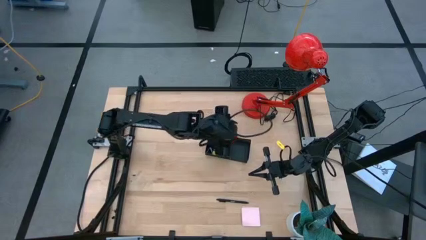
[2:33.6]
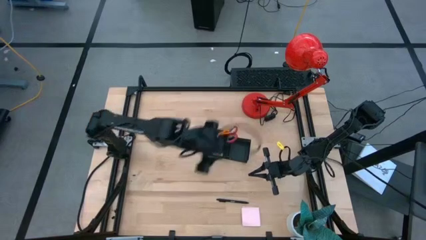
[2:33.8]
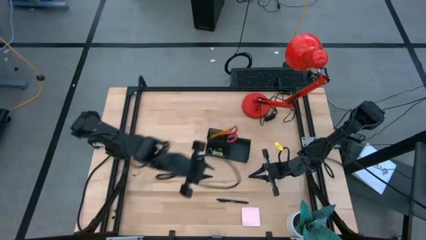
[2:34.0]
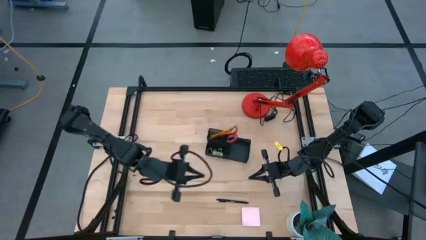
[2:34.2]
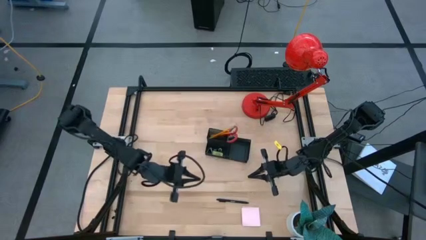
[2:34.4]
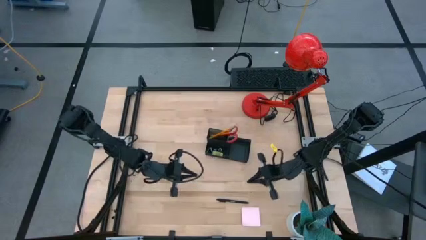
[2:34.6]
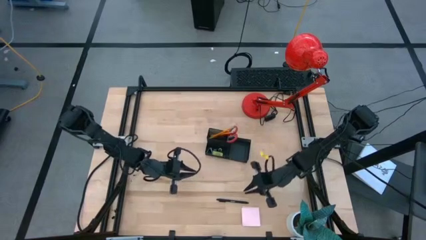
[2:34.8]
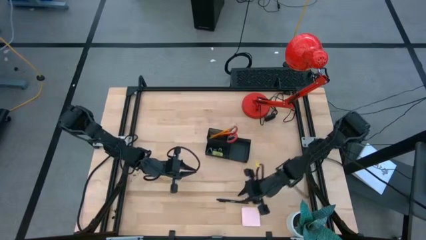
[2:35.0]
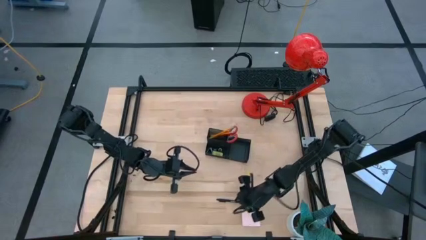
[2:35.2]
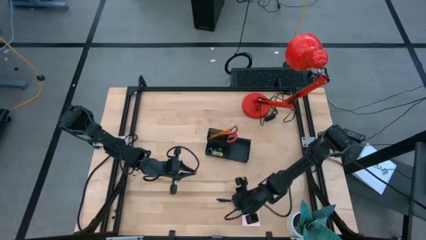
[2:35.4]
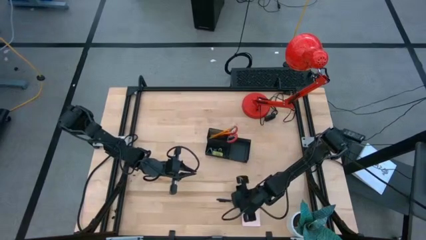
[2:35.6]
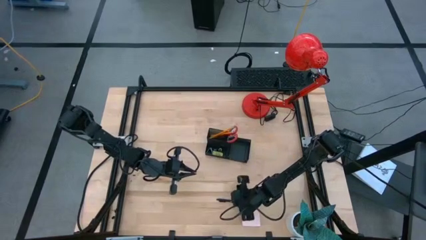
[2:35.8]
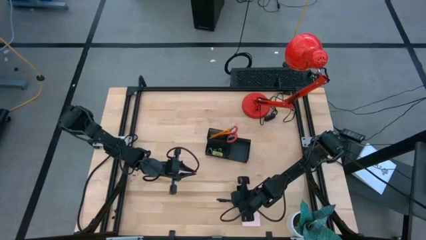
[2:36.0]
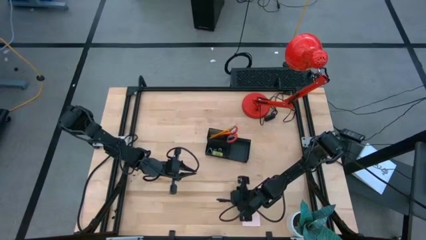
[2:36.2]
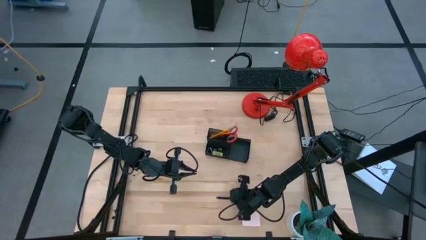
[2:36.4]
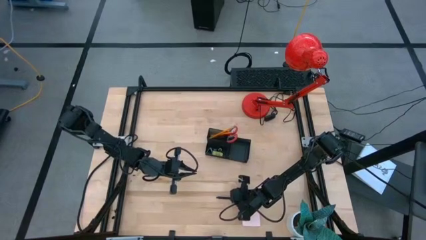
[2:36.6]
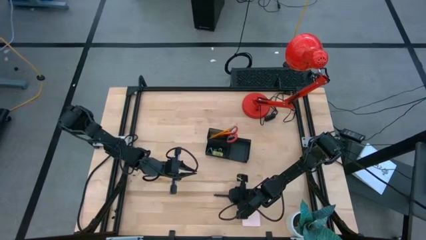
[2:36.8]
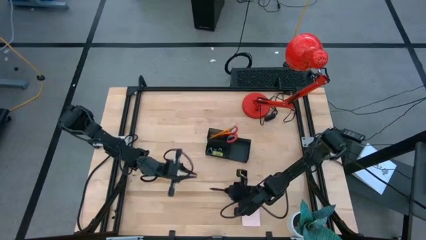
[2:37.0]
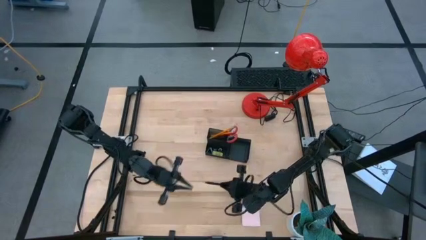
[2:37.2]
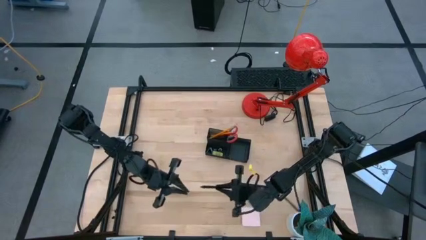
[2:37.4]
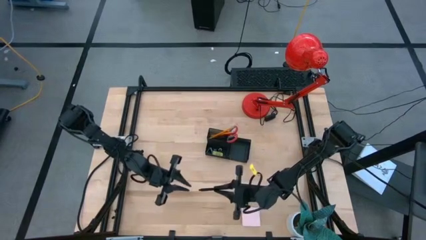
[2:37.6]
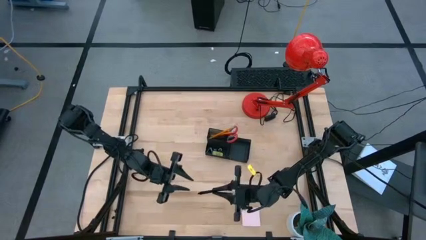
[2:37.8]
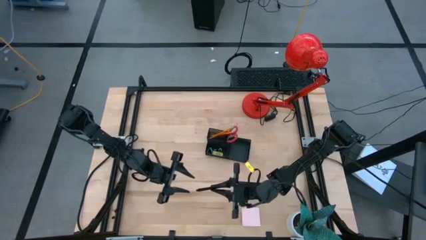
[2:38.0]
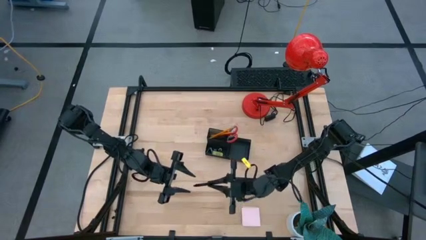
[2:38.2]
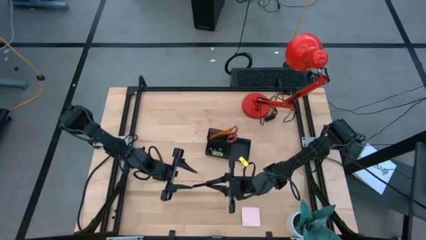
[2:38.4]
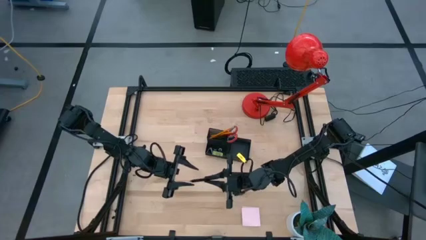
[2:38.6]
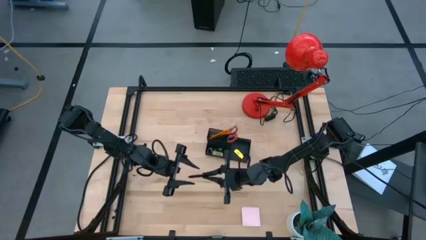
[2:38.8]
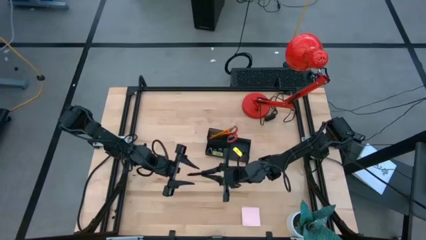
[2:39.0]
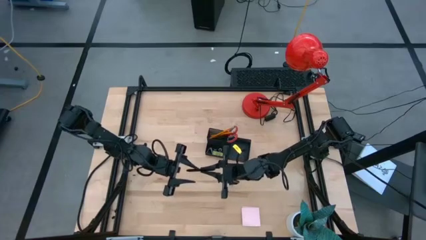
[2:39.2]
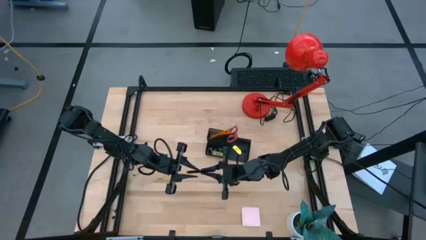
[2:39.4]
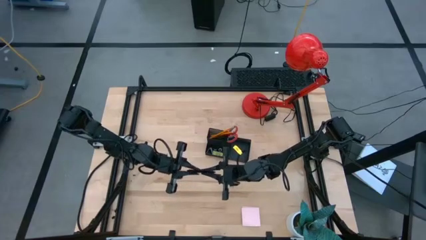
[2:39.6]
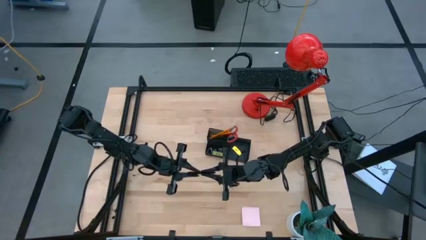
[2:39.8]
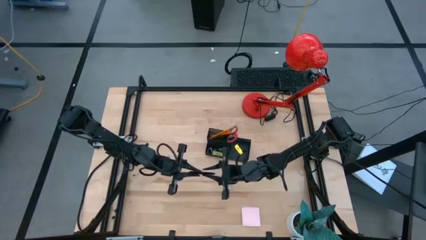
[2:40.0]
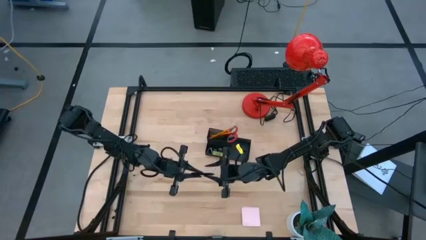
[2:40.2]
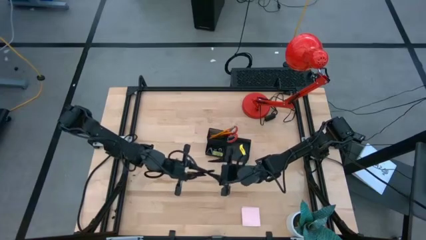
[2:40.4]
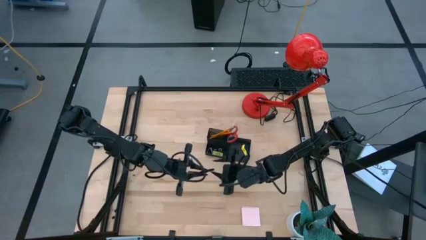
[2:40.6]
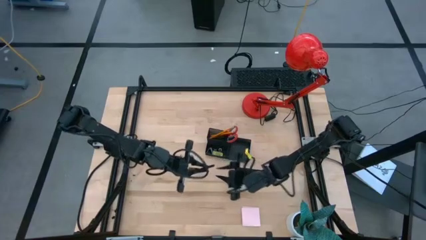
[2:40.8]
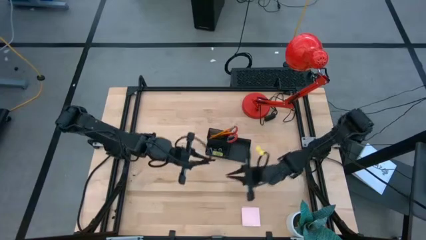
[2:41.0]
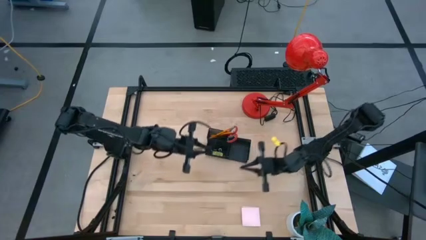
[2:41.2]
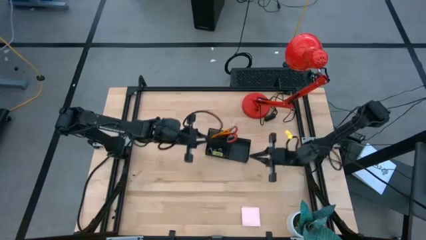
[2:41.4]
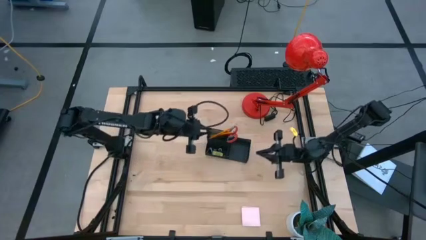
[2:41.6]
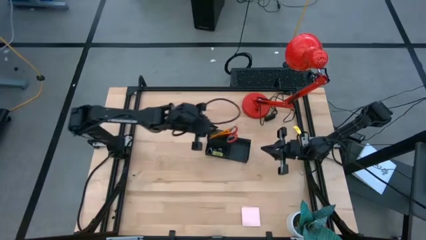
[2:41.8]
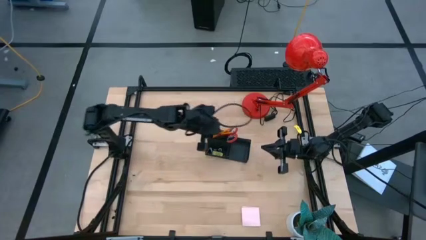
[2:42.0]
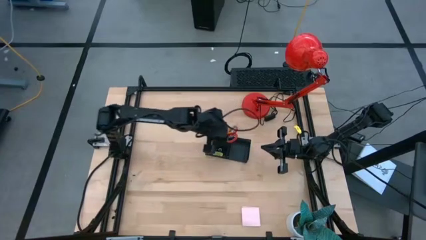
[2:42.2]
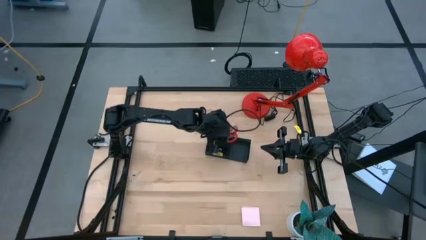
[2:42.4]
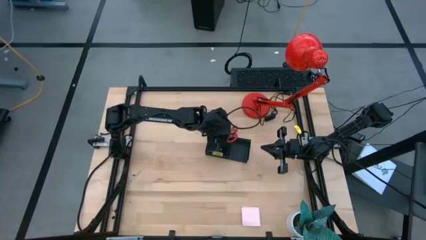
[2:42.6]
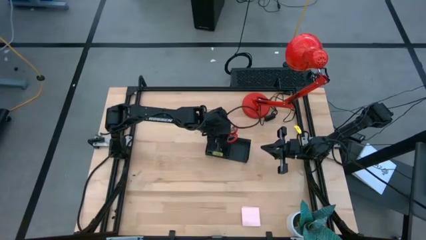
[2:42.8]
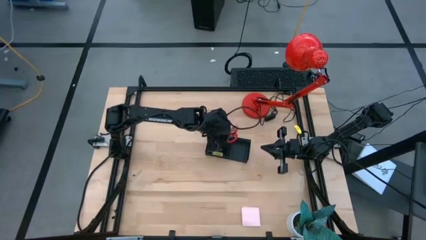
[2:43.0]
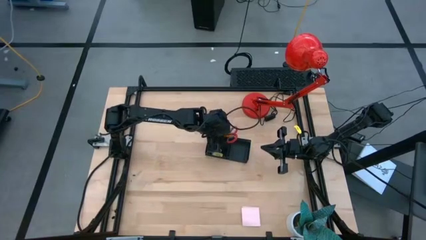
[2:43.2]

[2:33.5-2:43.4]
Task: Pick and place office supplies into organizer
Put the black pen into the black desk organizer

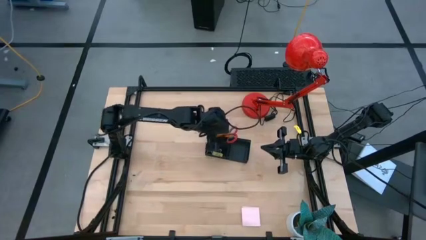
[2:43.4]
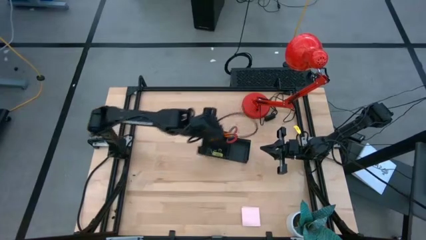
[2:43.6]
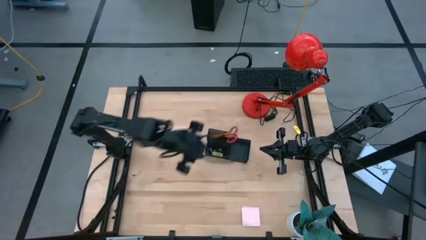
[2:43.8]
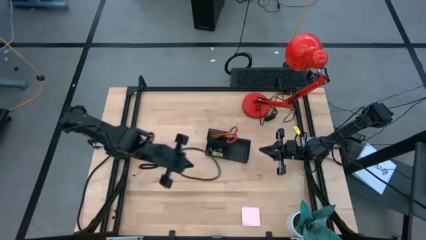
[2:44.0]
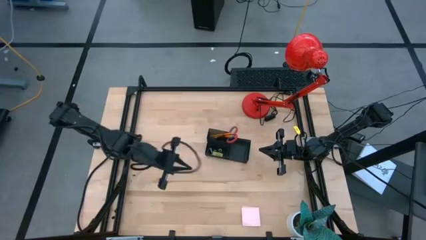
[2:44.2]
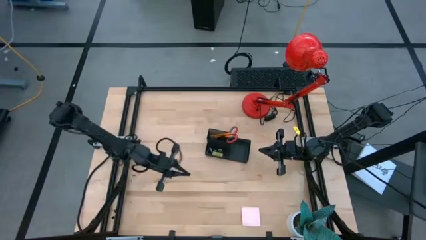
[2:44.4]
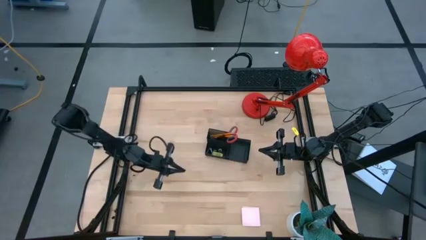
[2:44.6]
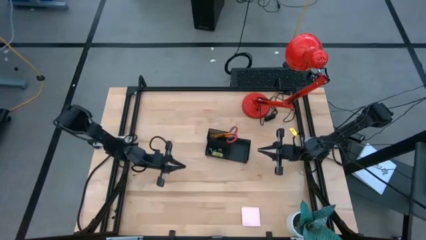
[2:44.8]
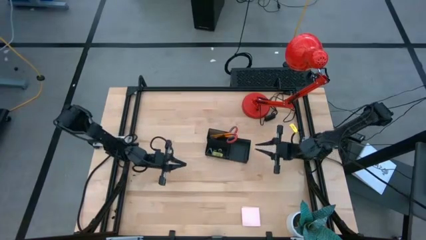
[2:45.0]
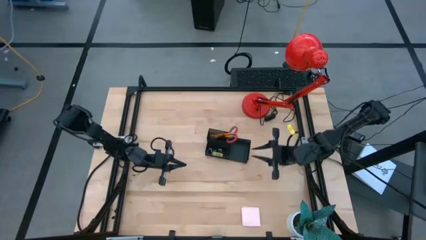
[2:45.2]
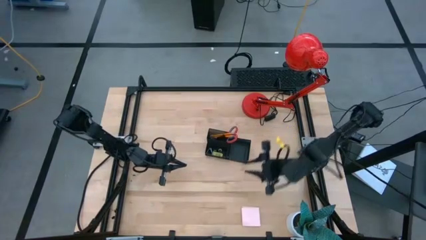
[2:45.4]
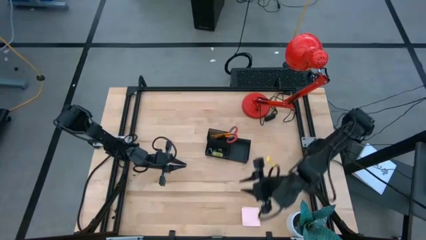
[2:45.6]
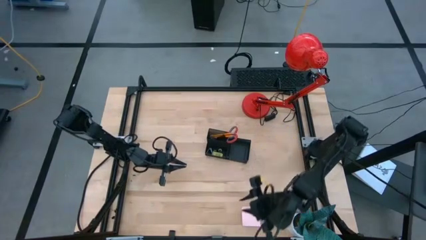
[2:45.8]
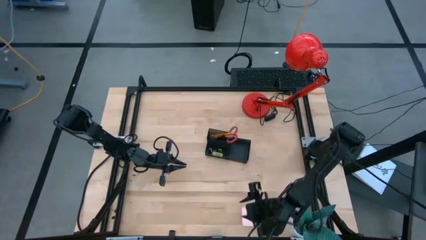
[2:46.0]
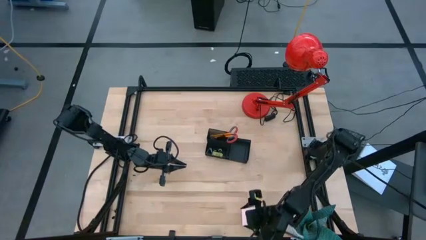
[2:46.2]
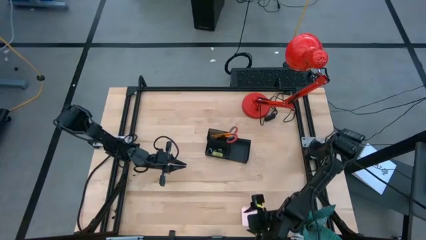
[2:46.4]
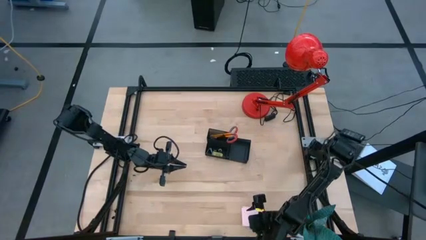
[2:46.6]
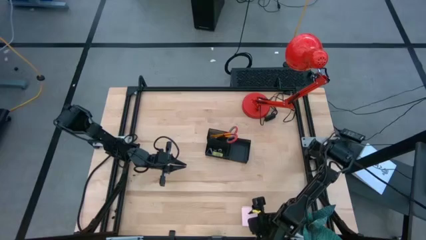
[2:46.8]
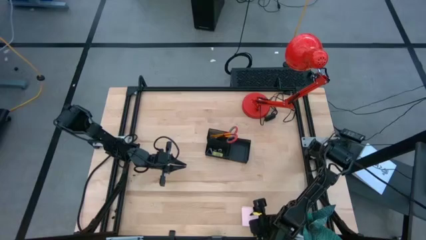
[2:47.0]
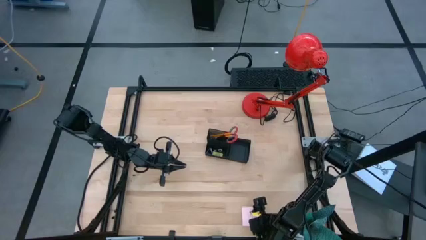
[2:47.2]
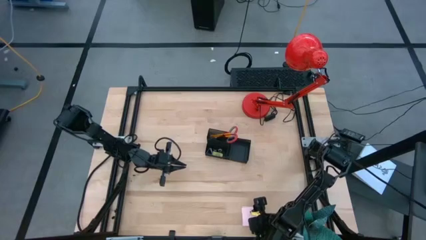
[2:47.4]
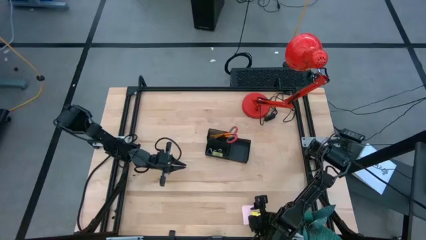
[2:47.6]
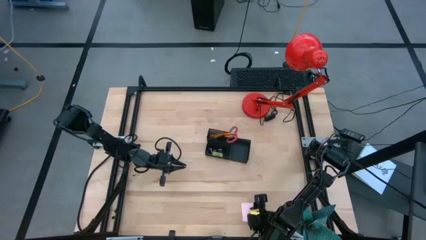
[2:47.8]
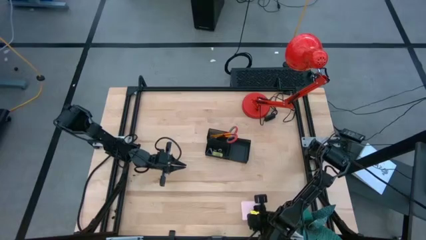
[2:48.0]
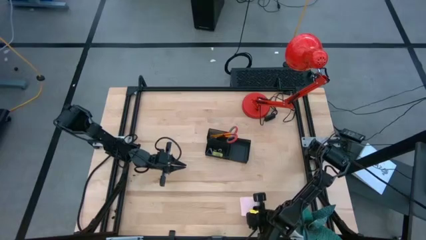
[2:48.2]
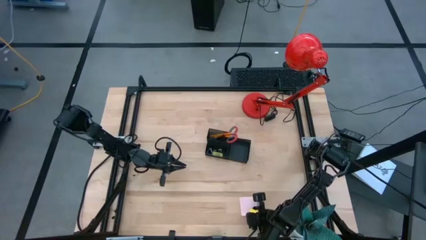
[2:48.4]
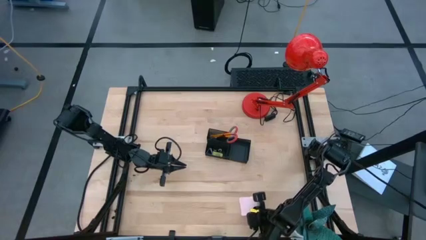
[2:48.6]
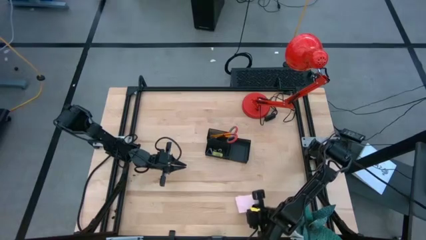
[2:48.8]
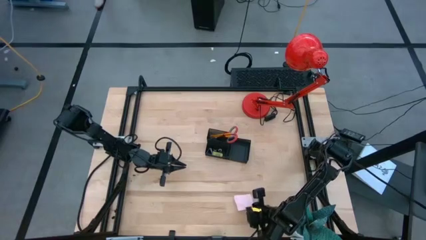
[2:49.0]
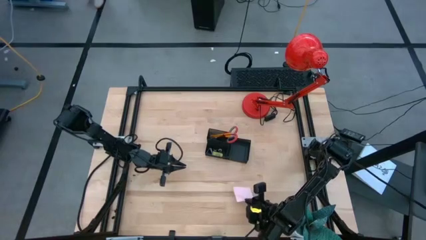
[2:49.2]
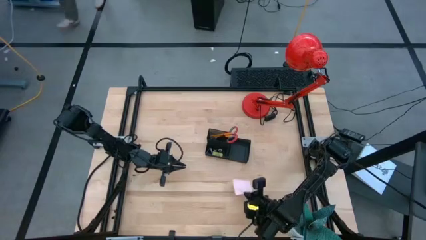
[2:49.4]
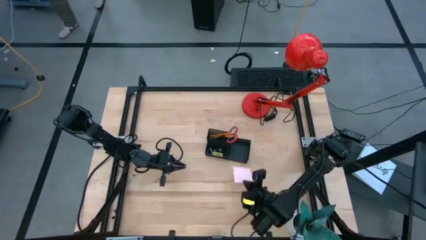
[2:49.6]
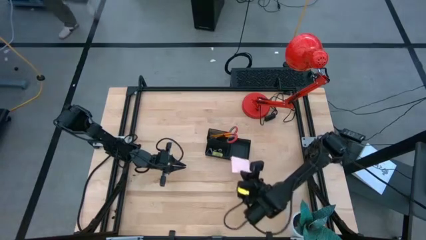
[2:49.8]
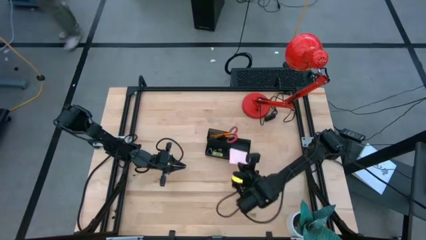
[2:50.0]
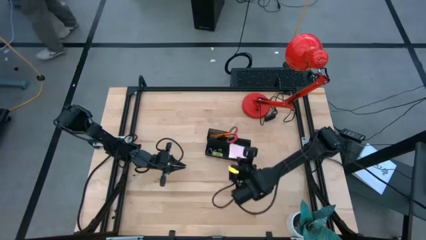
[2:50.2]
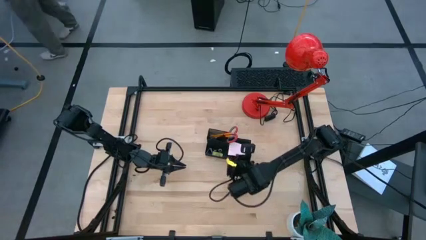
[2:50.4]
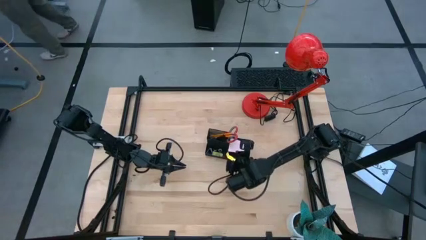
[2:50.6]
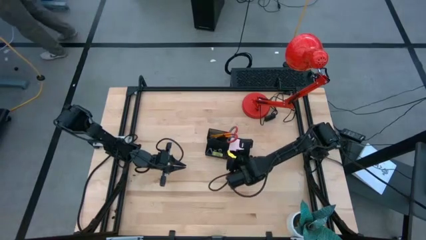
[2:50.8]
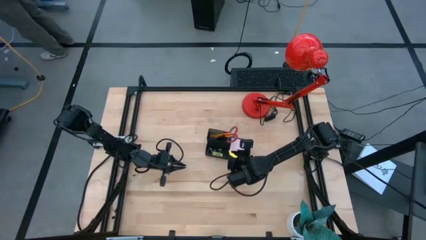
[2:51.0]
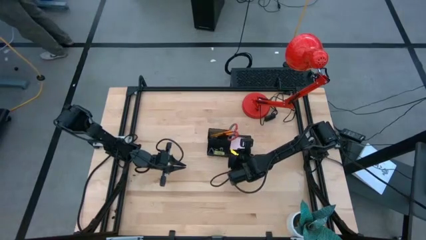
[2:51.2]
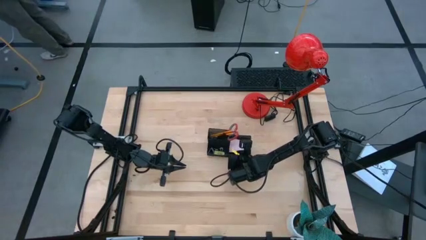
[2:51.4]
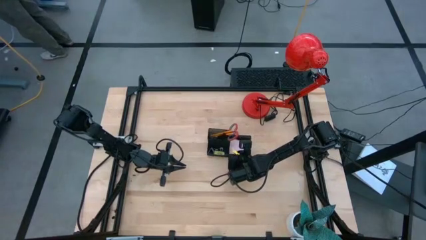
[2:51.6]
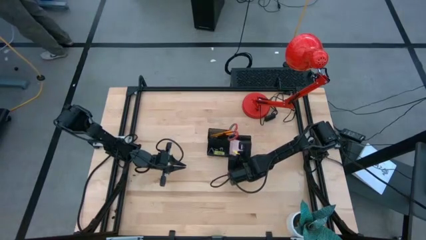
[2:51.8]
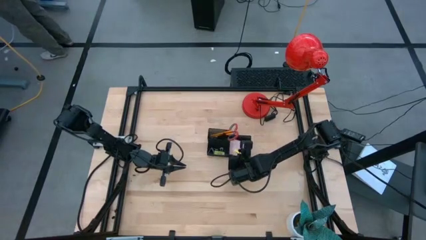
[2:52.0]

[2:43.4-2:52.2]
Put the pink sticky notes into the black desk organizer
